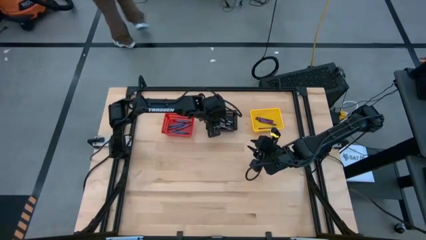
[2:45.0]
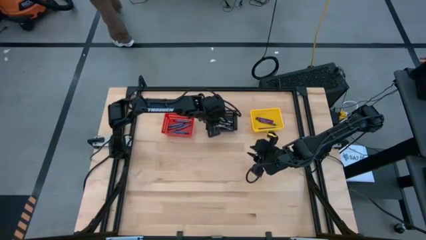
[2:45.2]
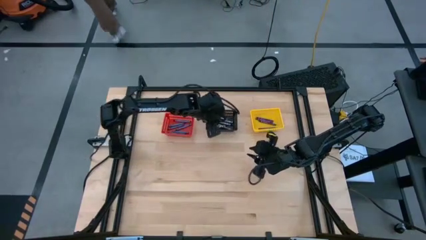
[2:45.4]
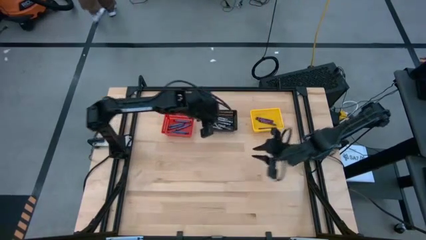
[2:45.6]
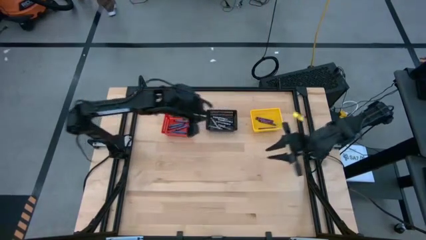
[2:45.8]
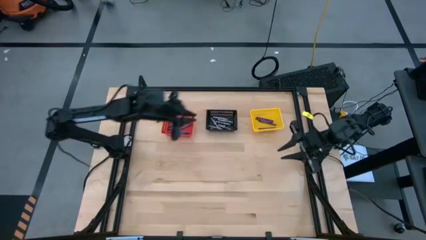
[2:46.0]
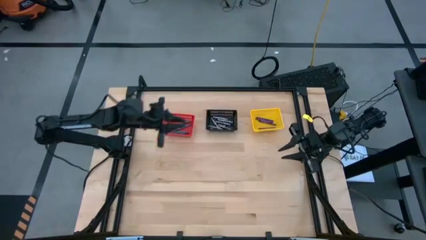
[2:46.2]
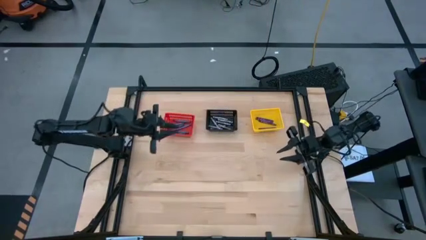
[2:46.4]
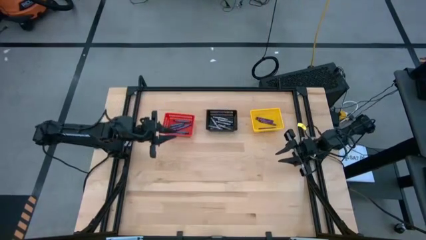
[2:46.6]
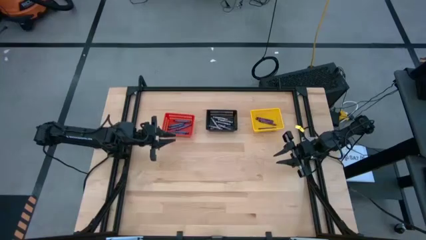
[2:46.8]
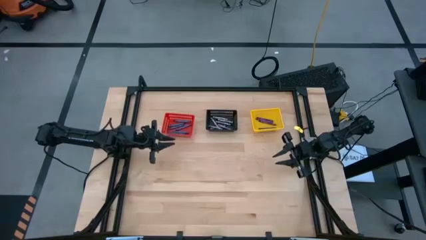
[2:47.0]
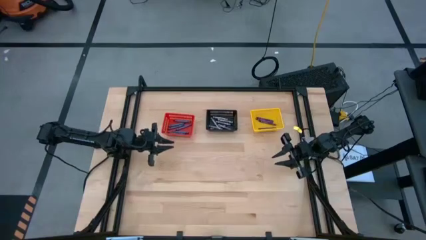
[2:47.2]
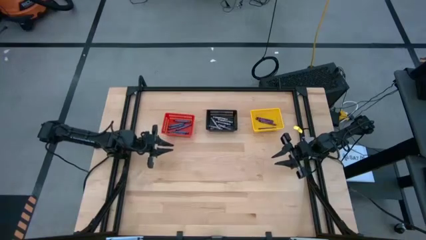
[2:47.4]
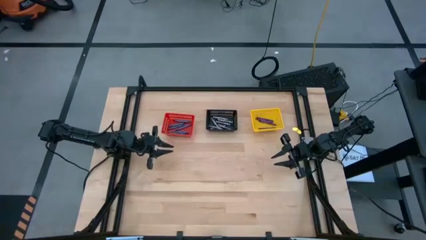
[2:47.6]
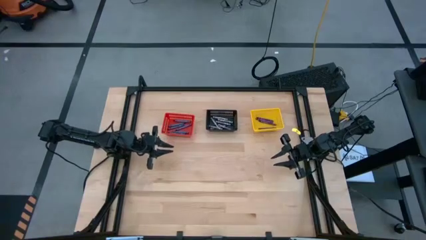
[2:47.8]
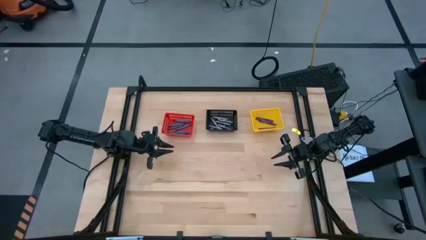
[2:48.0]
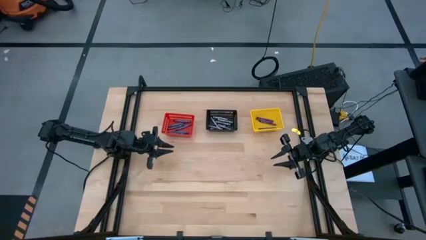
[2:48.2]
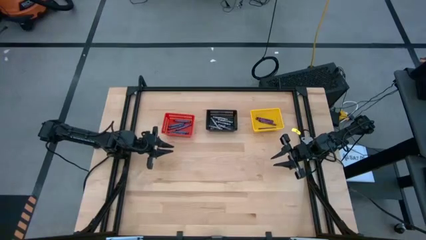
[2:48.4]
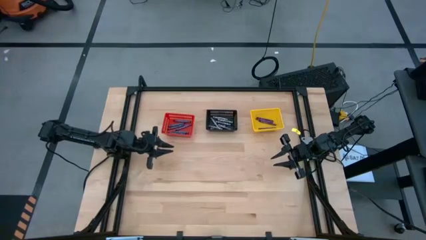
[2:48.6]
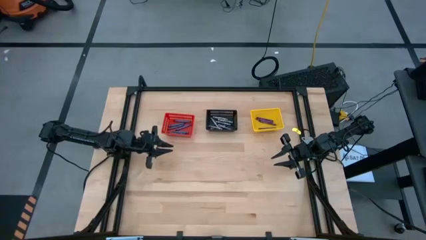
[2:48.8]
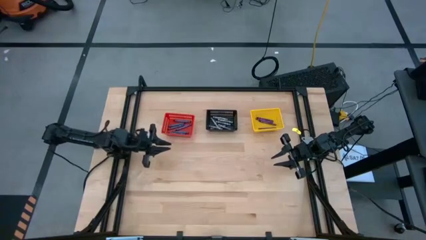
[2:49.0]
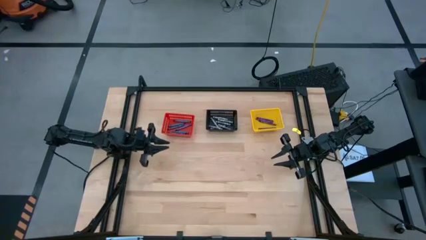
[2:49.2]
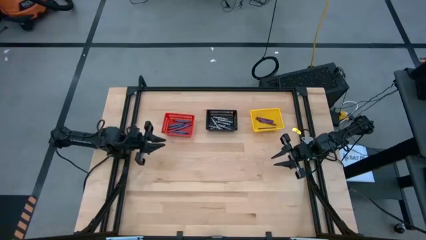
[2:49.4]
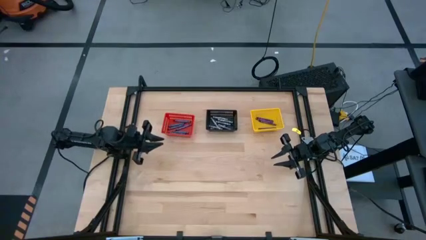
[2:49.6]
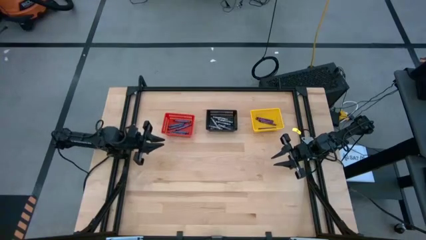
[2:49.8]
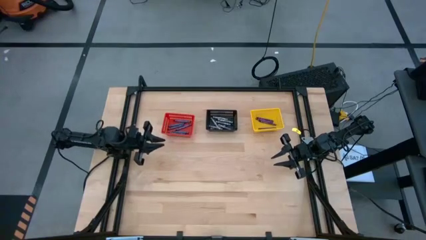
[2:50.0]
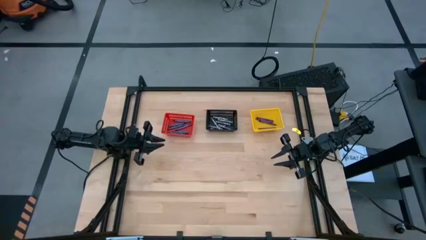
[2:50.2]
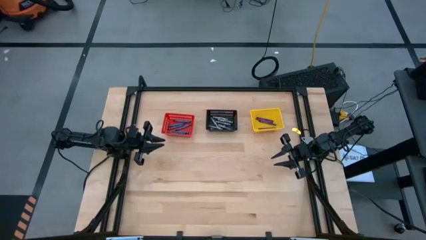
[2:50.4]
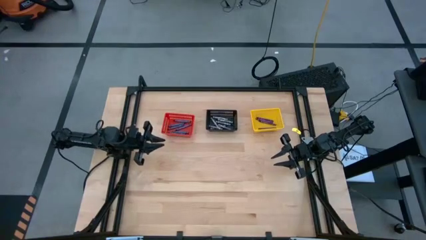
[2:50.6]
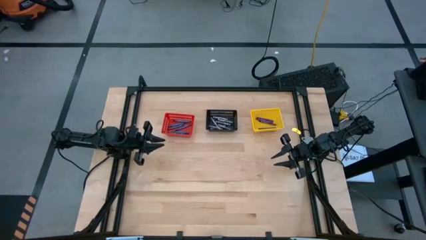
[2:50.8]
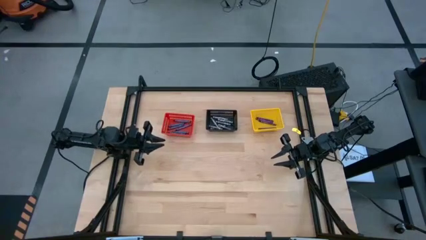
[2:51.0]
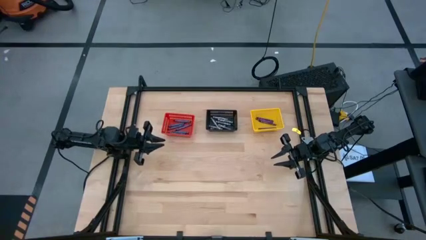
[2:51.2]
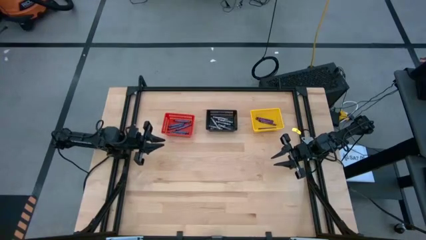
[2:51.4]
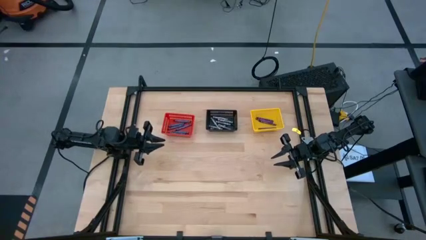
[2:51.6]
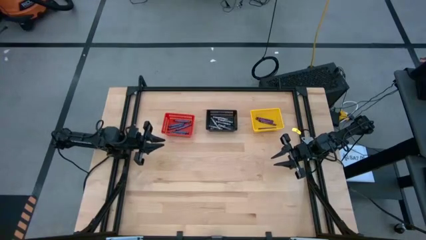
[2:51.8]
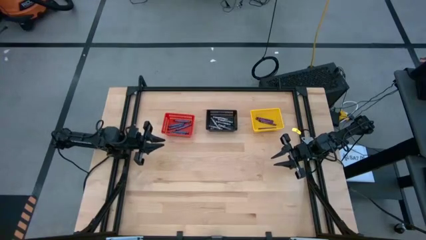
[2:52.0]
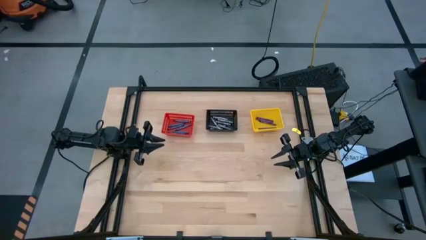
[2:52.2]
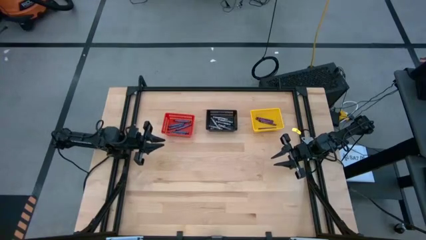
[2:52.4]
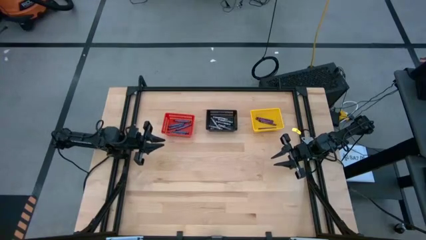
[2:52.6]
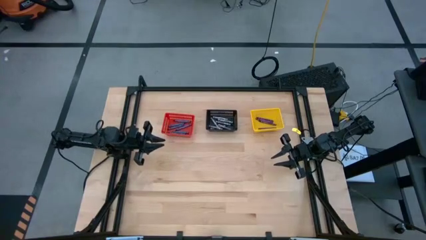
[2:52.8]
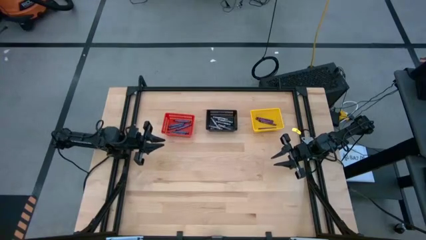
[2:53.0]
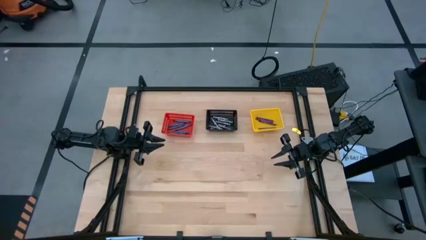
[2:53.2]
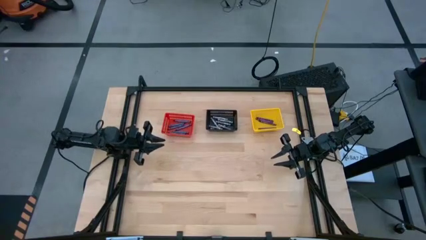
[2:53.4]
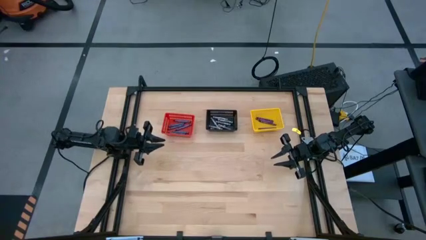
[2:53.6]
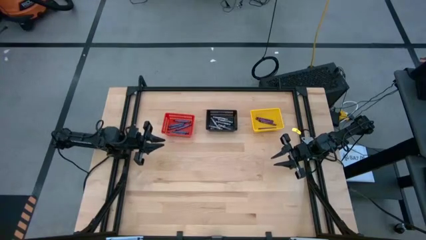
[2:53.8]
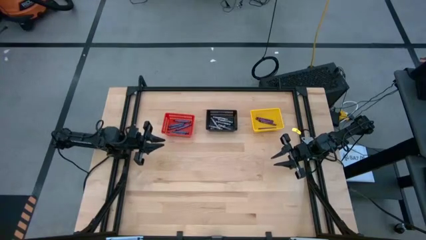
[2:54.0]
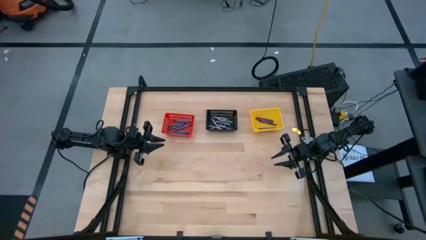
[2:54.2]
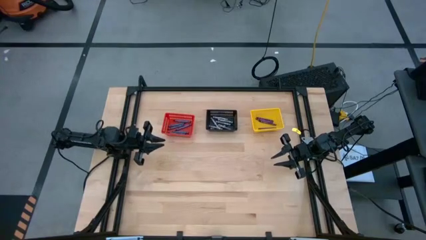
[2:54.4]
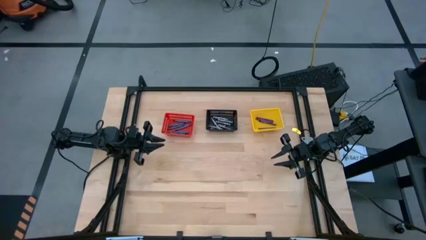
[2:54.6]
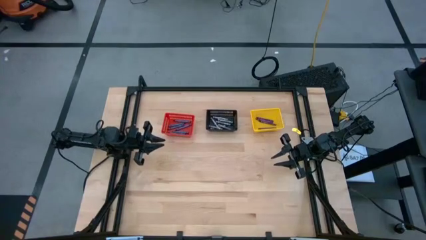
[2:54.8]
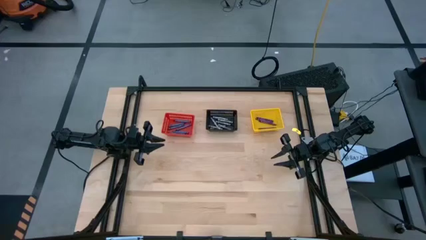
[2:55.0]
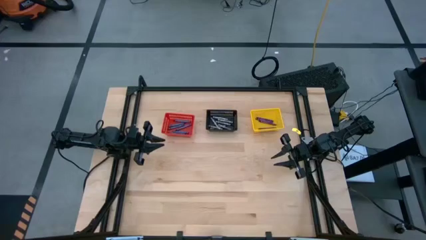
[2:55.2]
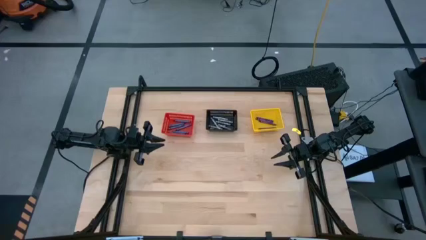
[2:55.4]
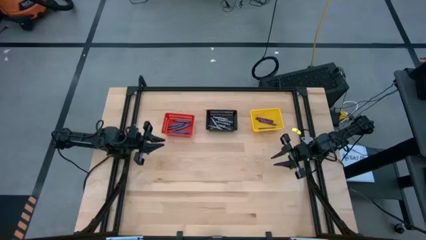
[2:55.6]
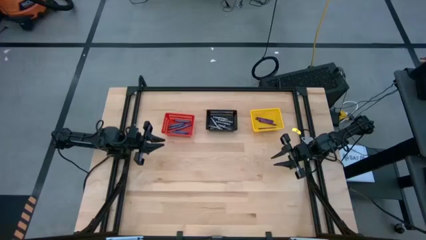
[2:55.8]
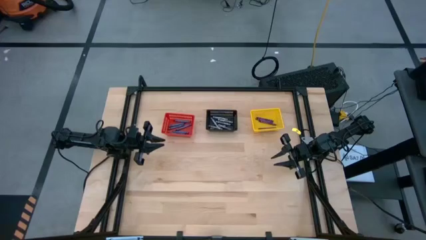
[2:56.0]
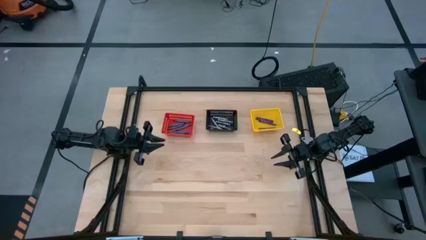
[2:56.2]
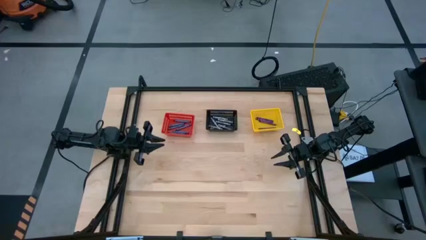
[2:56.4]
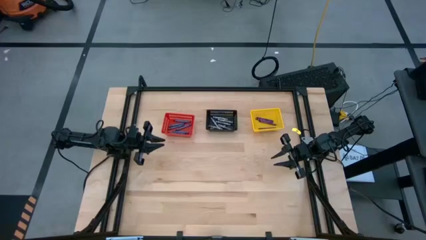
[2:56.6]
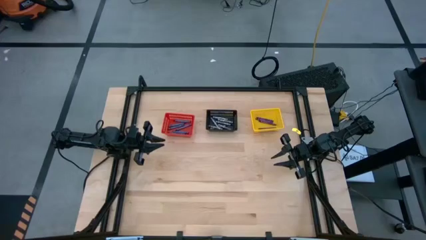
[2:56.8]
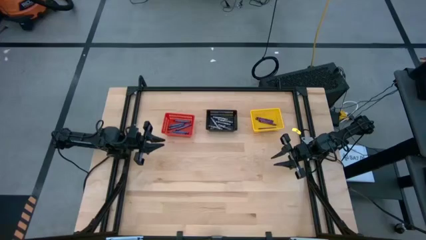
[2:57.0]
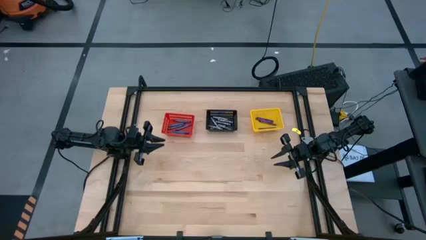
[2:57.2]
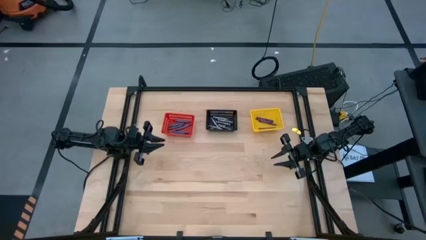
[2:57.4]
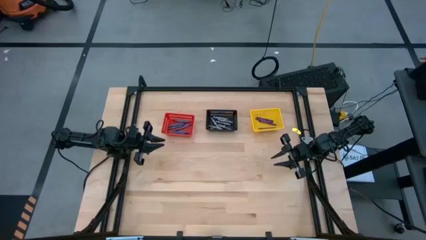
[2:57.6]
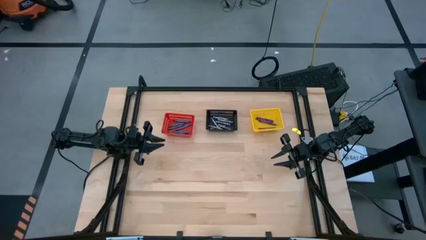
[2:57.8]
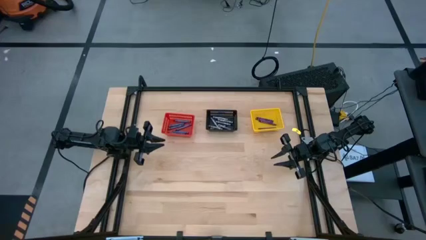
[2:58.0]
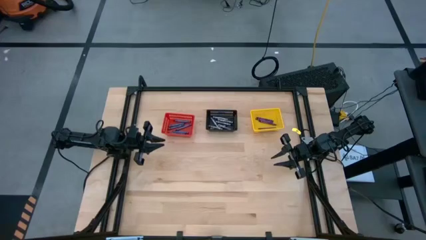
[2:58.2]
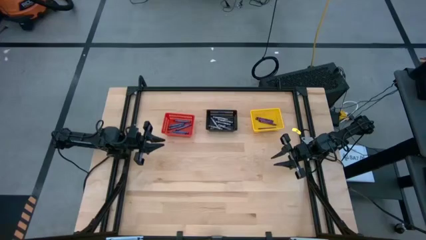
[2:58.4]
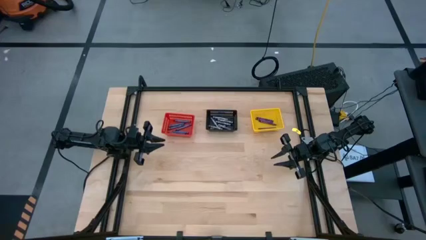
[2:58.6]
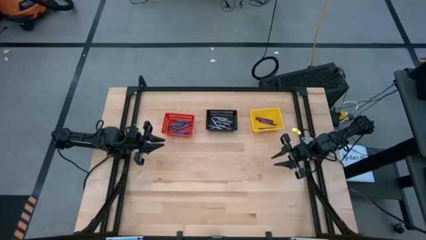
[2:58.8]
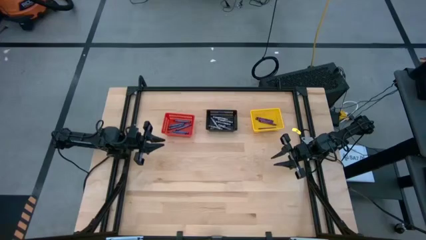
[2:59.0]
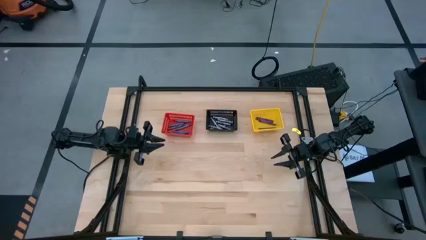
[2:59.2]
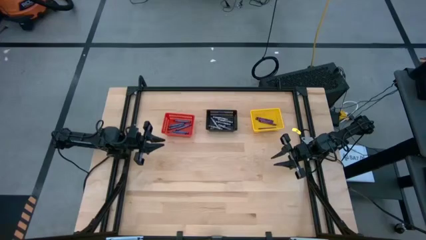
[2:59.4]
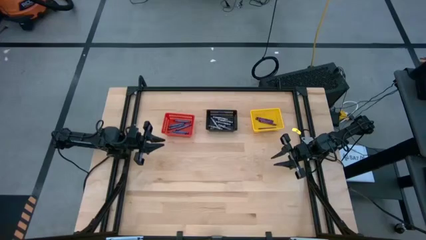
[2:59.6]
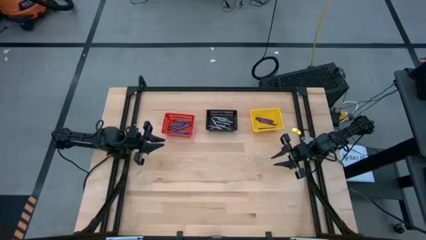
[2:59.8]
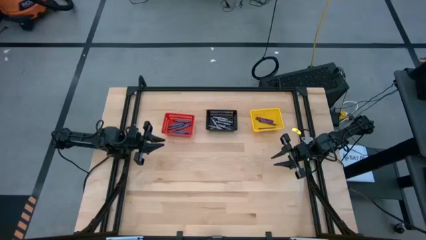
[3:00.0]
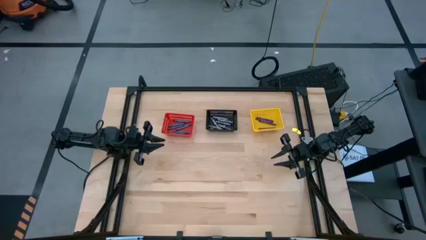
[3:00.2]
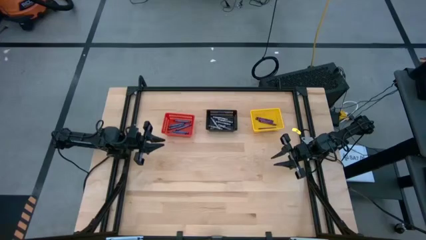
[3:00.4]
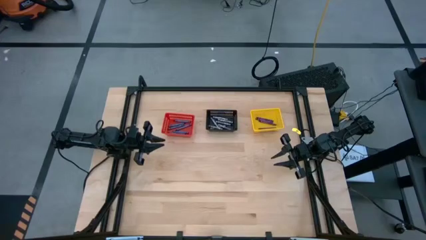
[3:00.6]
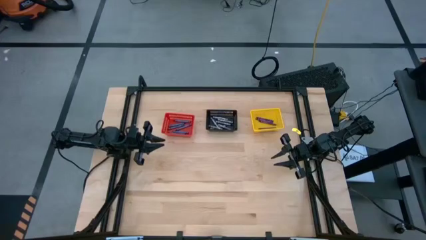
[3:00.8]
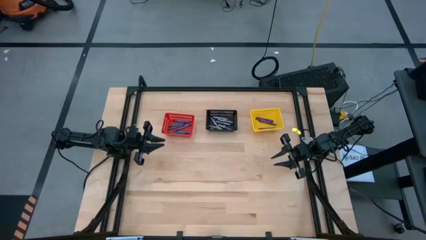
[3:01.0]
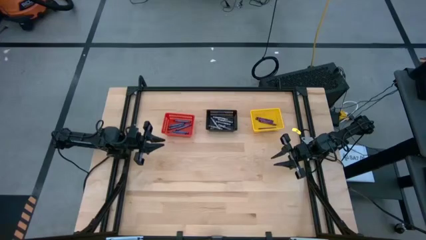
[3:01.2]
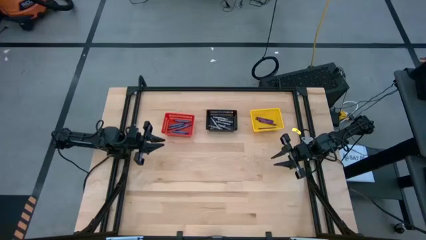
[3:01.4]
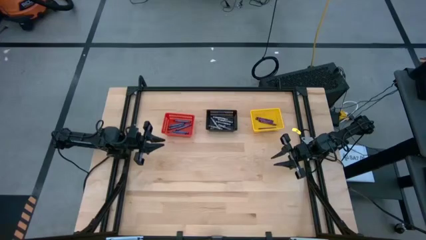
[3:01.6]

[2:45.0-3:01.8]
Task: Sort crayons
Return to Home Position
